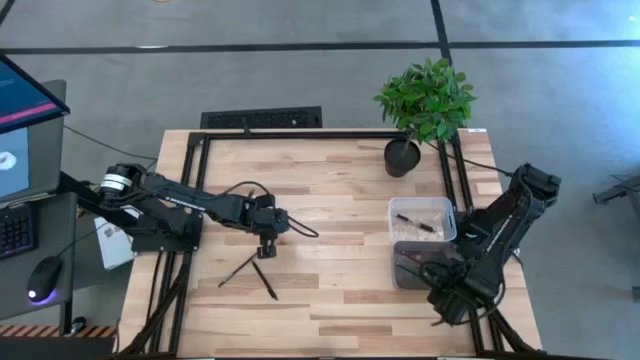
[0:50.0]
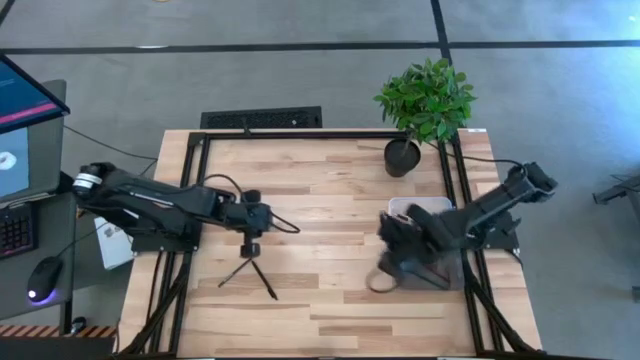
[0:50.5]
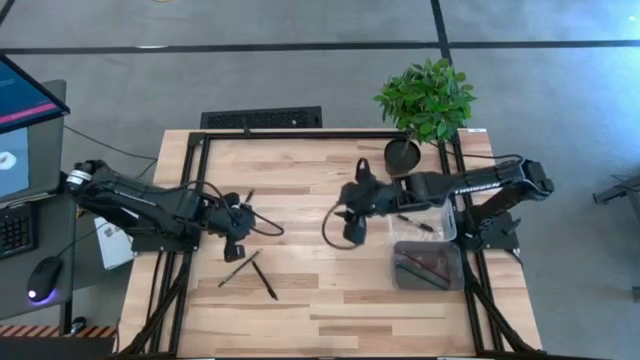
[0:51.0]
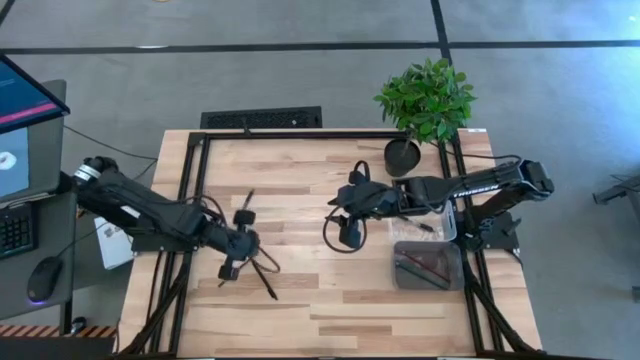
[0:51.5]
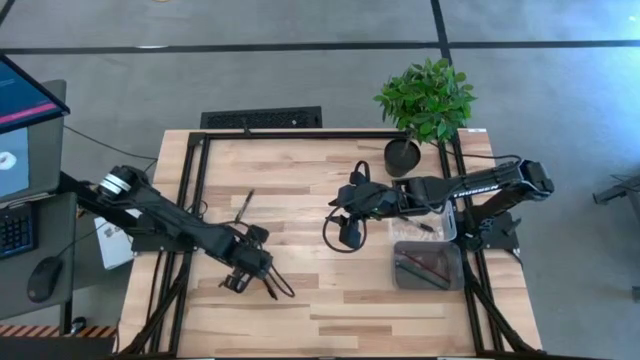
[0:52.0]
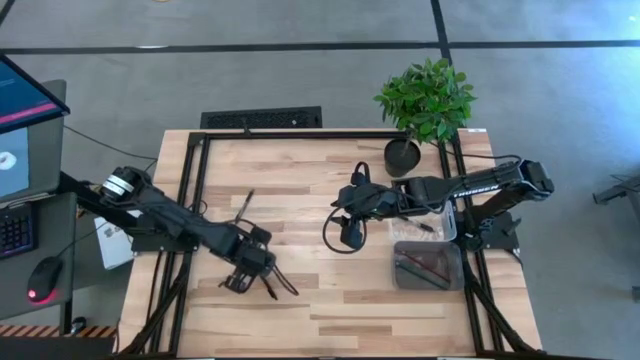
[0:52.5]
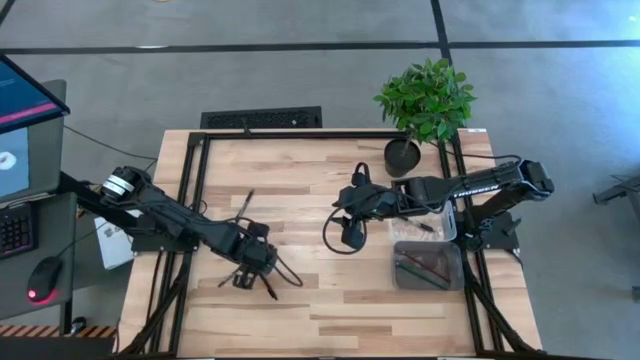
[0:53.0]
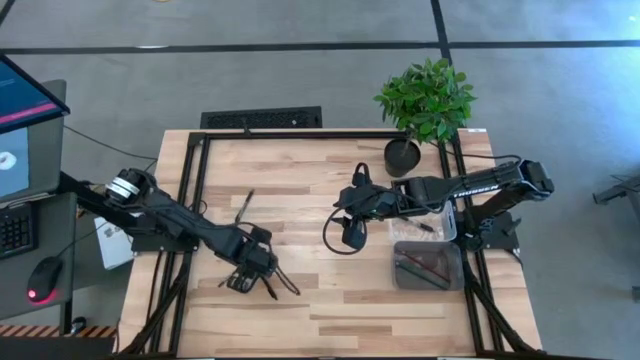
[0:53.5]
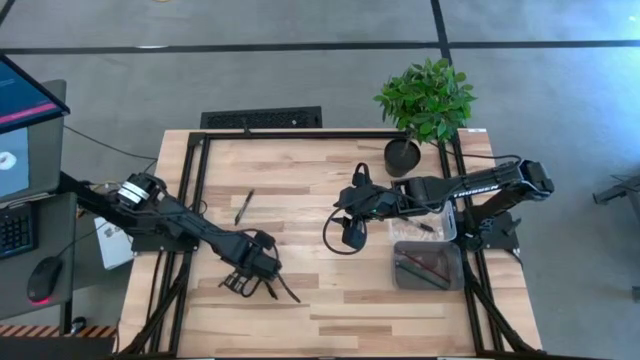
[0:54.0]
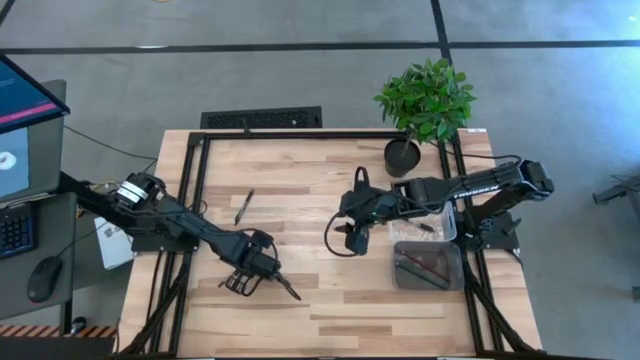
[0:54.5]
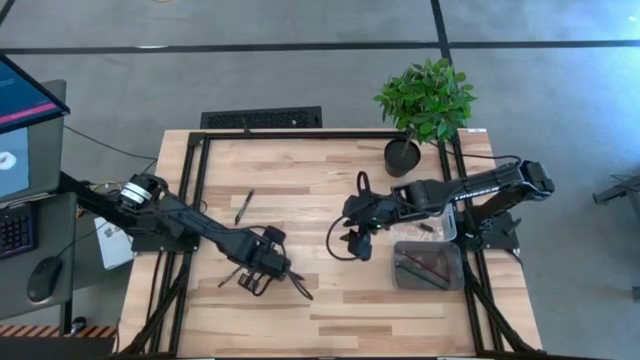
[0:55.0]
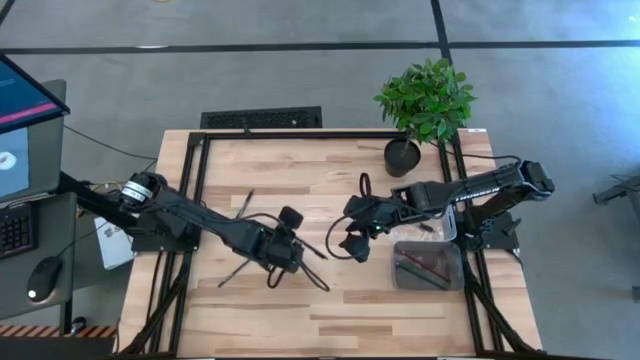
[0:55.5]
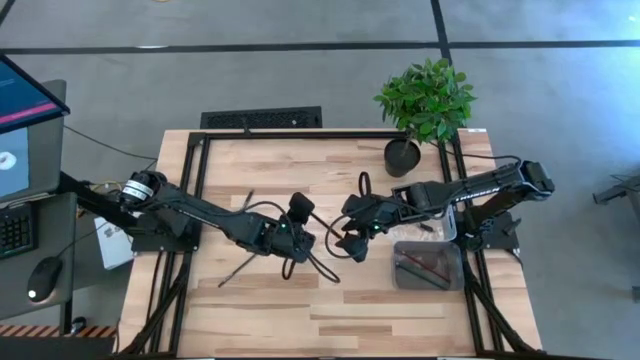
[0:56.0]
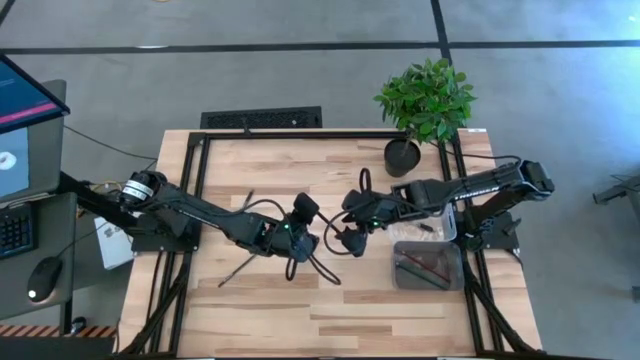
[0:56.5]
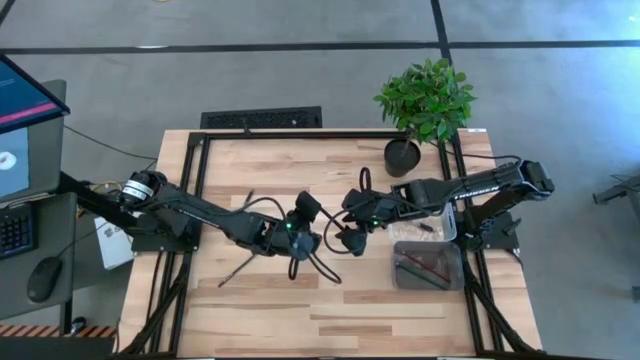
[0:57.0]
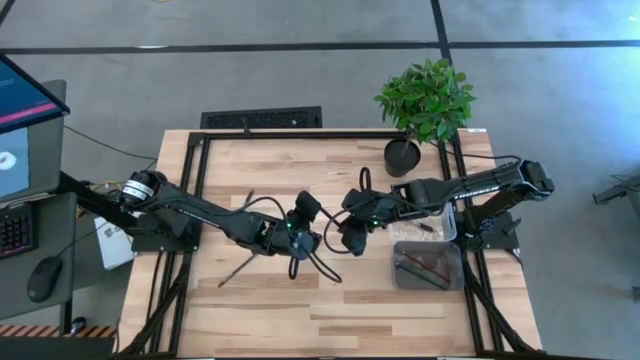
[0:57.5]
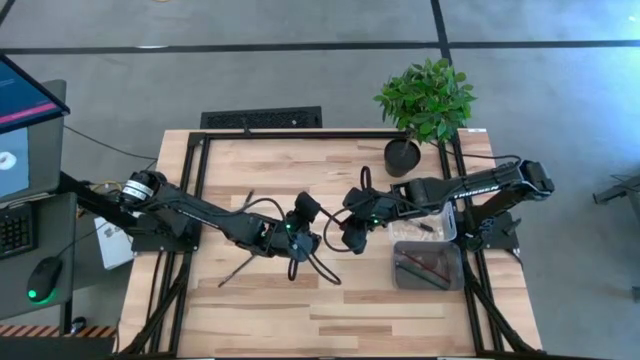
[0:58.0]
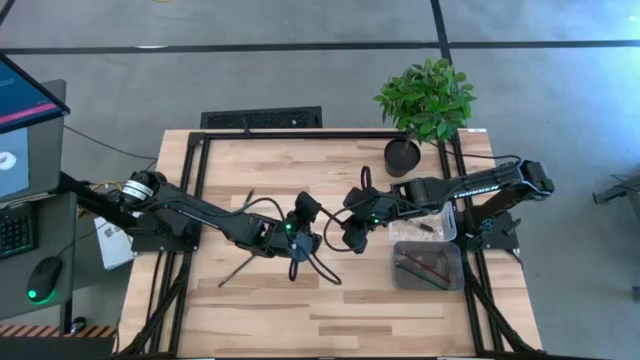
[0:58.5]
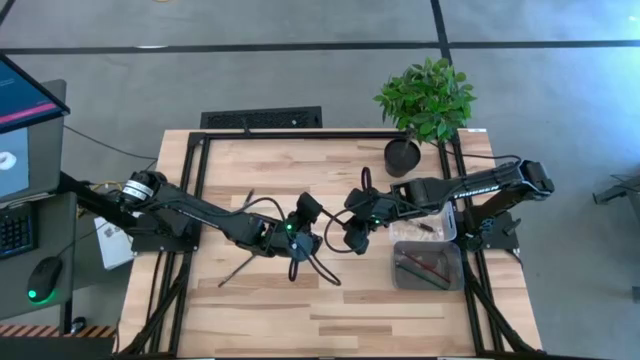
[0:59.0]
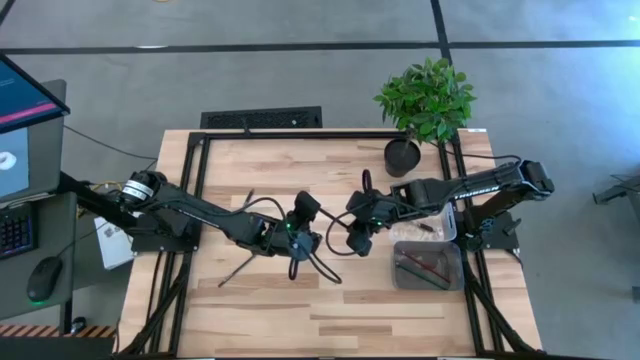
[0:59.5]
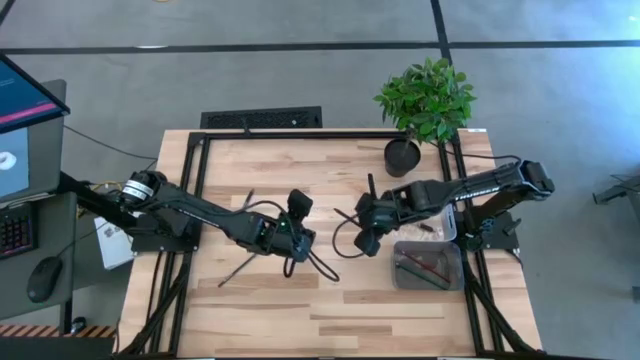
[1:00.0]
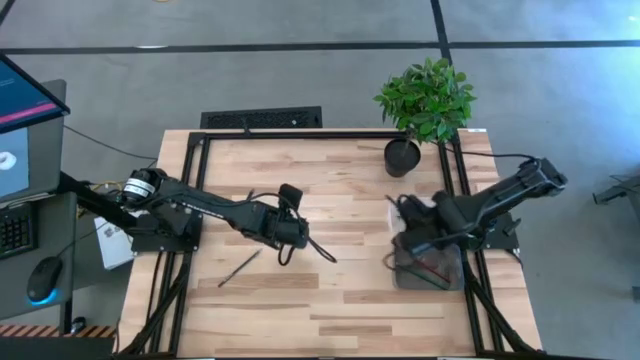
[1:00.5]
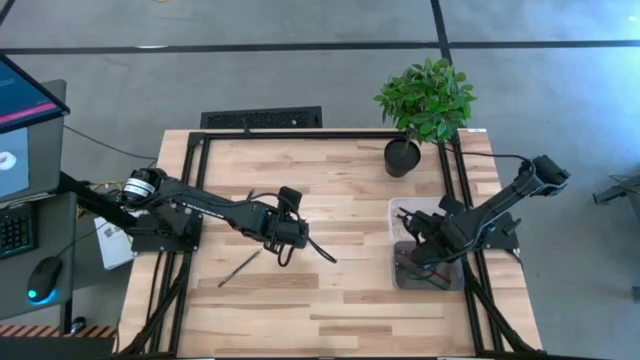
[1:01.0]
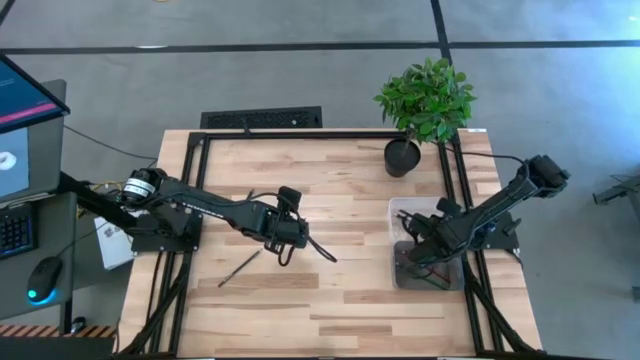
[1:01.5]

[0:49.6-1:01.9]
Task: Sort pens & pencils
Put the bottom black pen into the white transparent bin

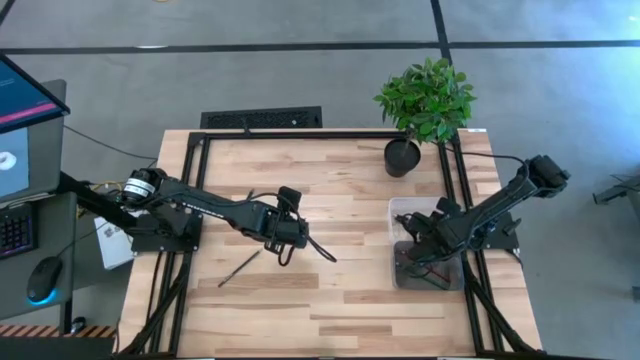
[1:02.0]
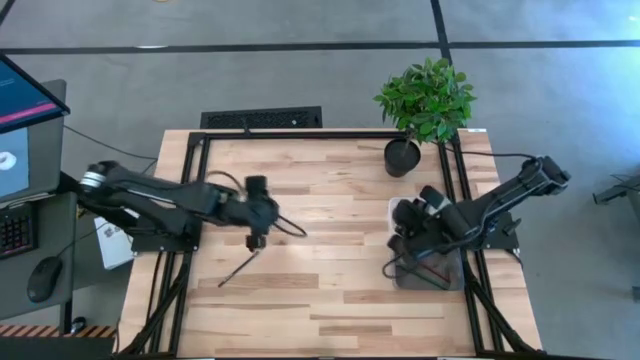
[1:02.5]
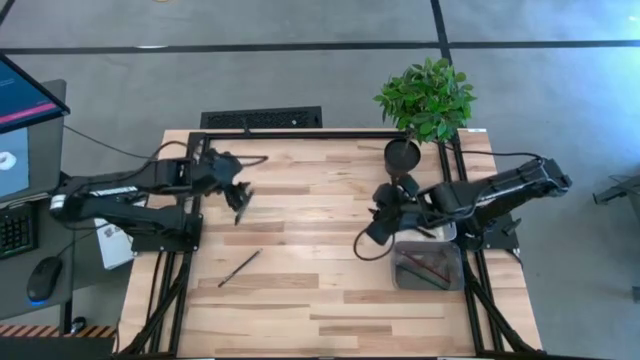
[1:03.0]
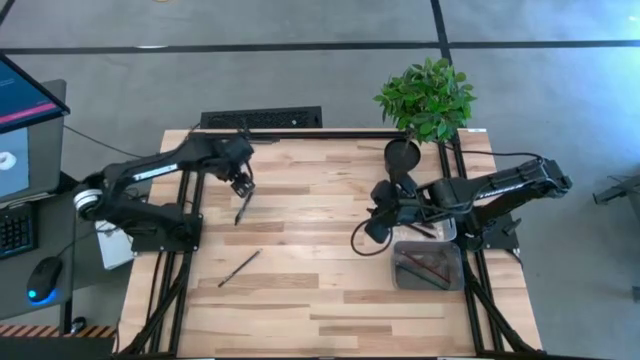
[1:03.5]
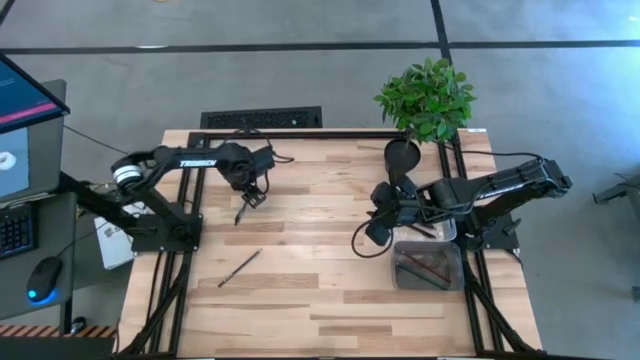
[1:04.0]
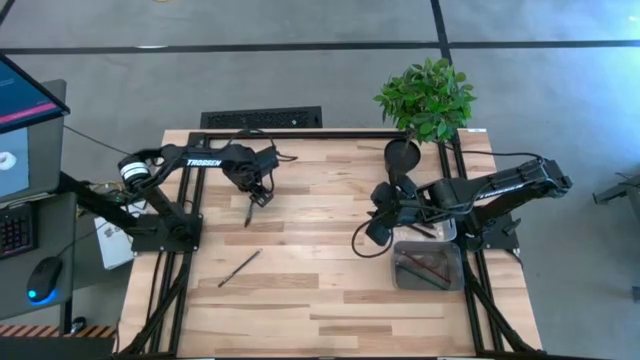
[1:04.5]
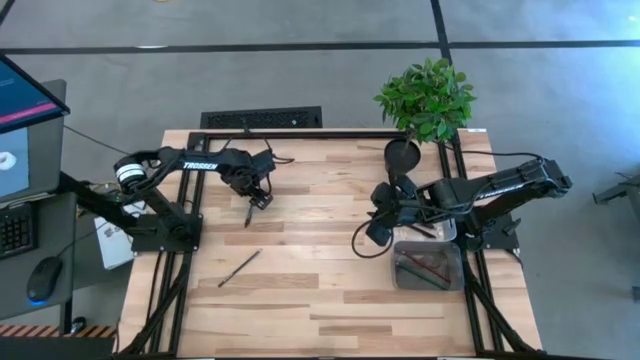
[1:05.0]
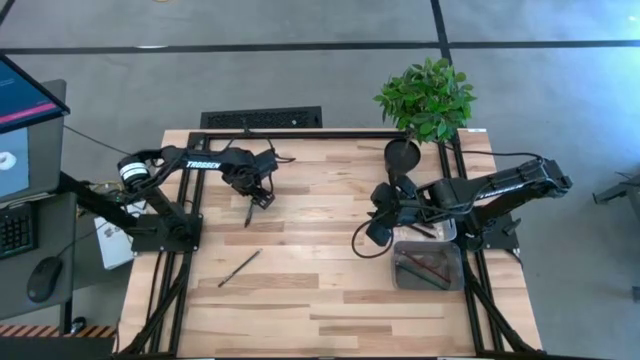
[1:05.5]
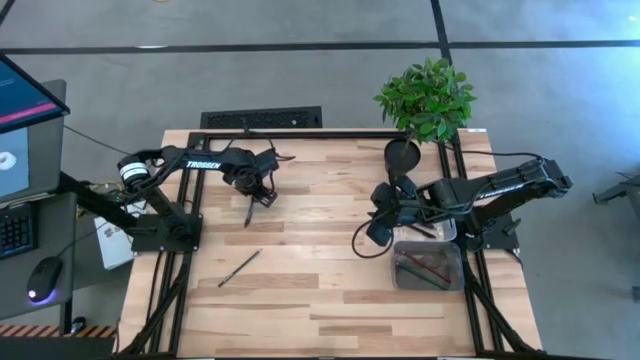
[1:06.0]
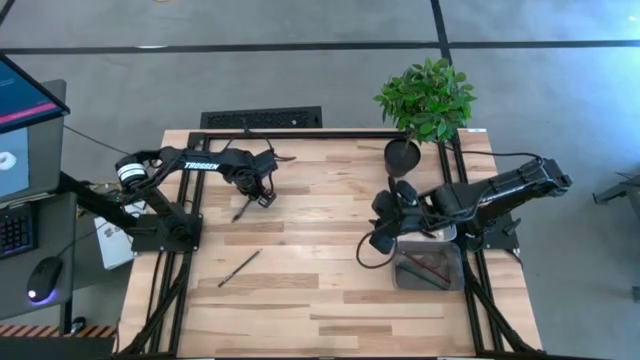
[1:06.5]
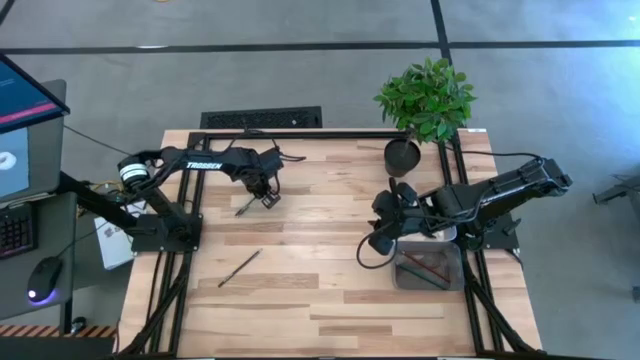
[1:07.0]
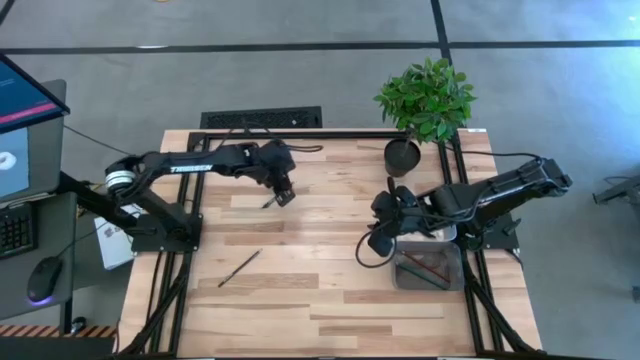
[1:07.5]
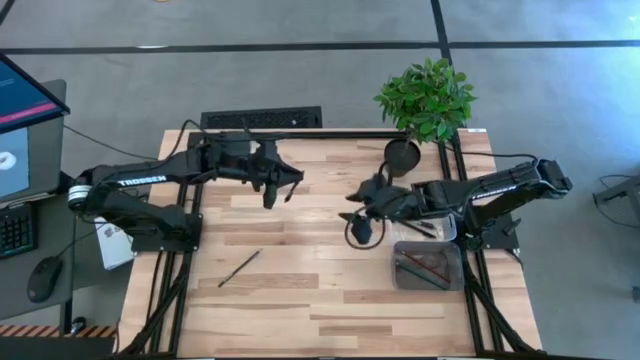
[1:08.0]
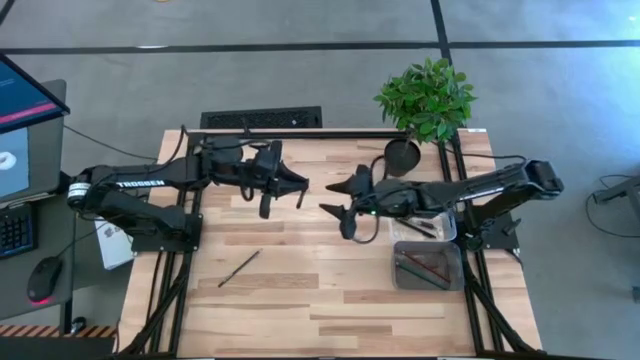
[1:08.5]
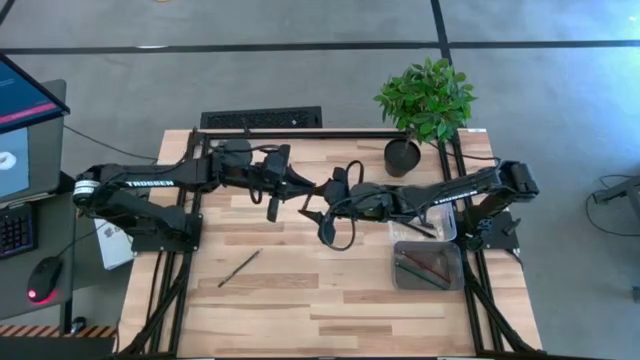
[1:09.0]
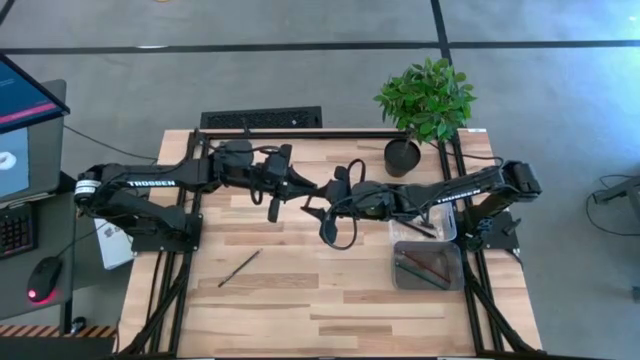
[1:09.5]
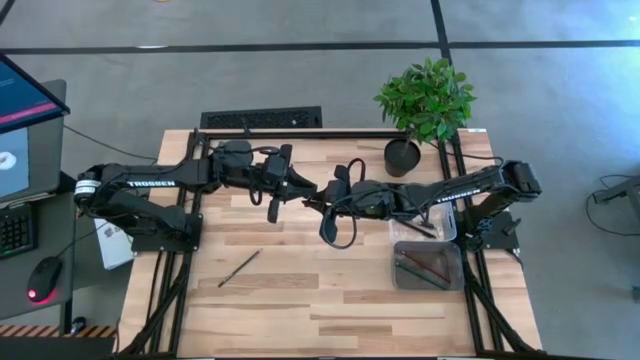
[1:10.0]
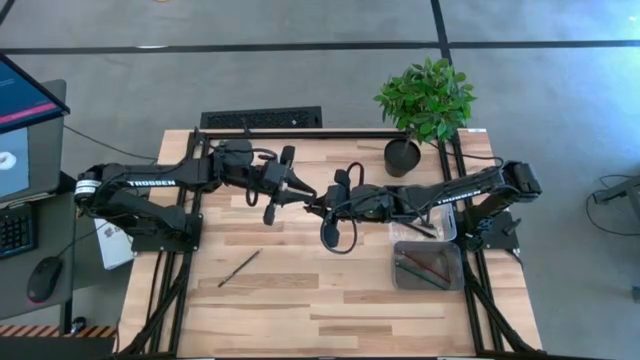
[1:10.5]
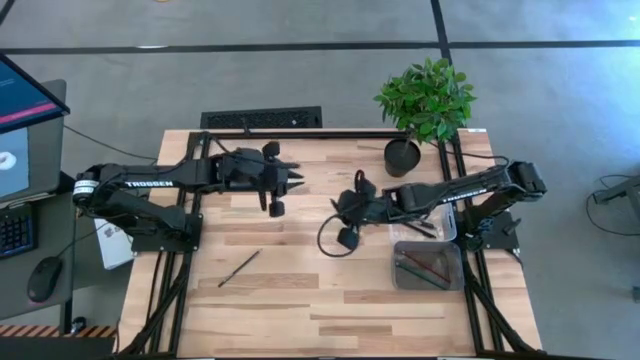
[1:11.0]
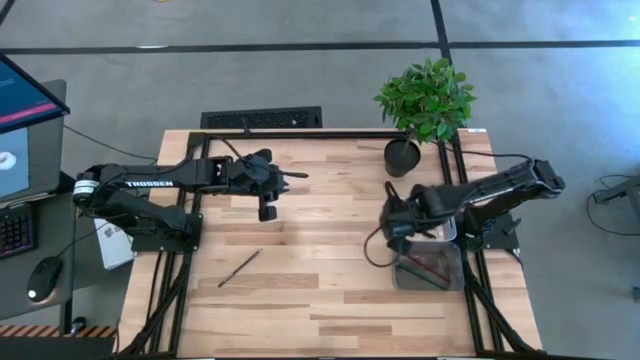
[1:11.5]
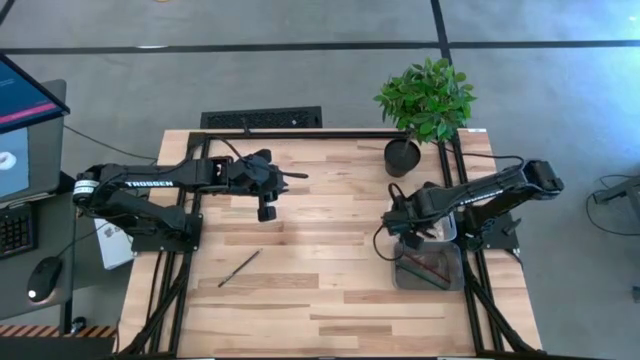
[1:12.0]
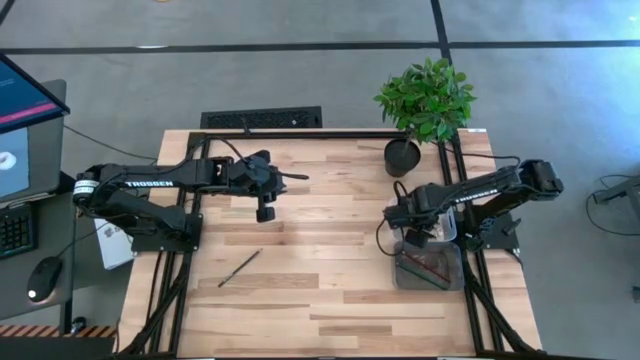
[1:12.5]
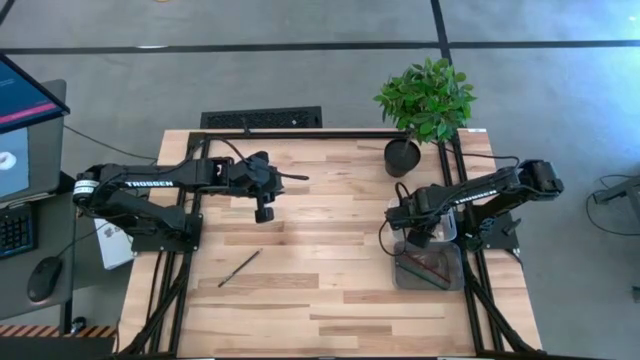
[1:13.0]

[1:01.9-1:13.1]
Put the black pen into the white transparent bin
